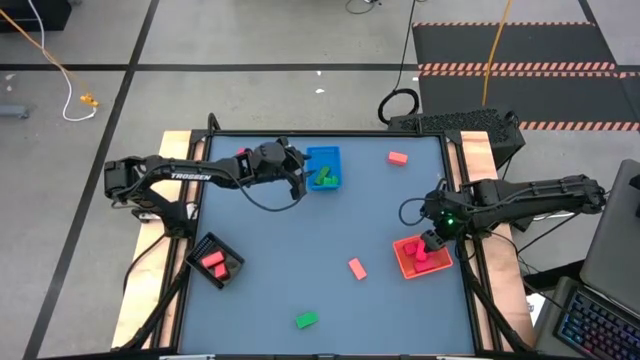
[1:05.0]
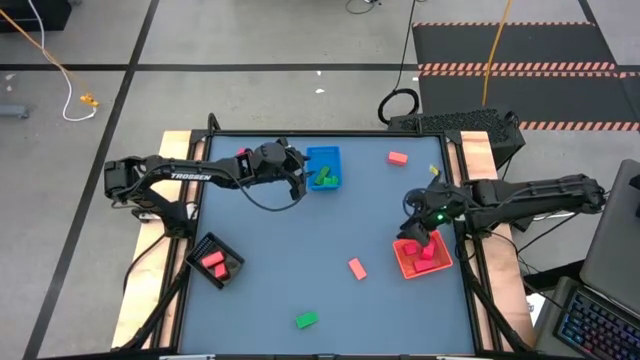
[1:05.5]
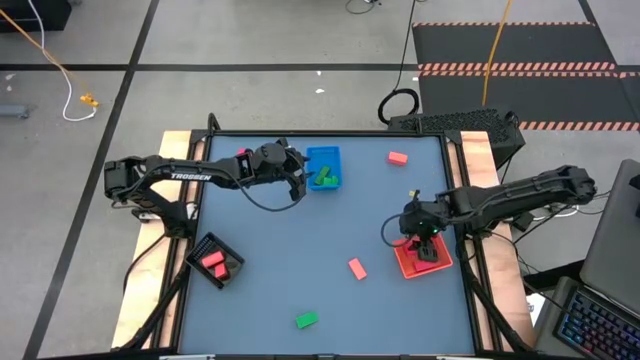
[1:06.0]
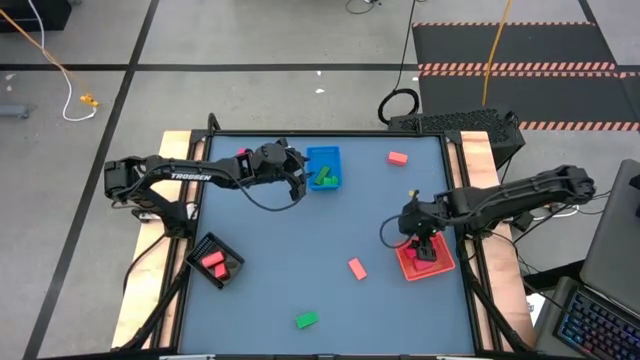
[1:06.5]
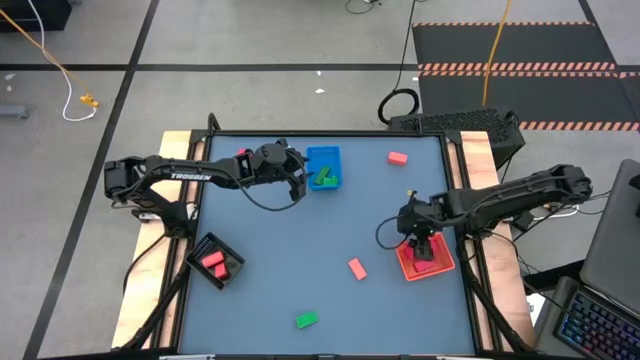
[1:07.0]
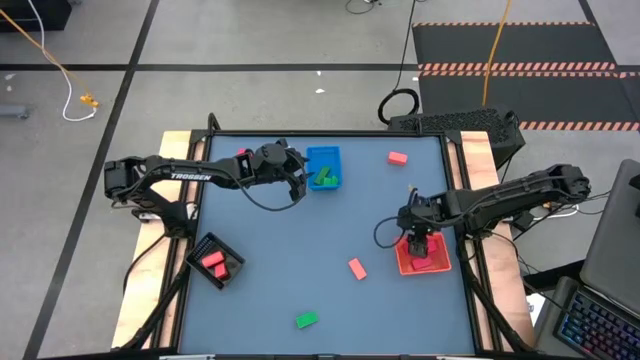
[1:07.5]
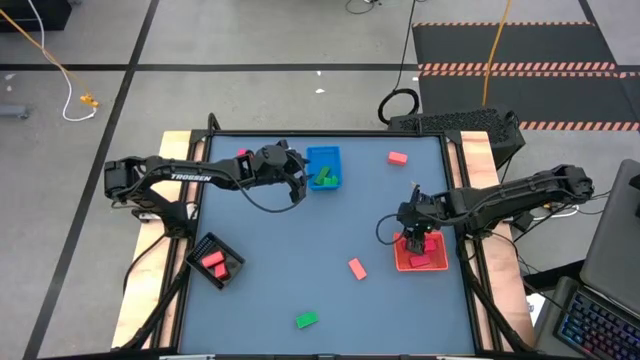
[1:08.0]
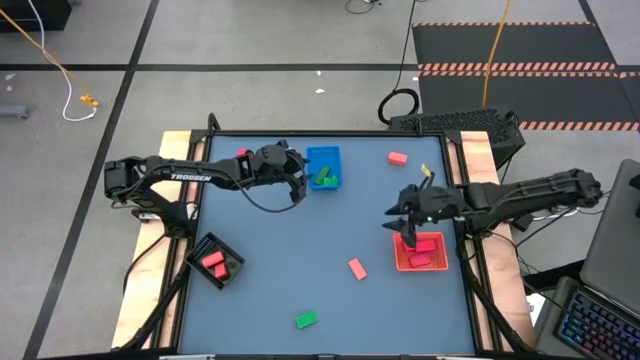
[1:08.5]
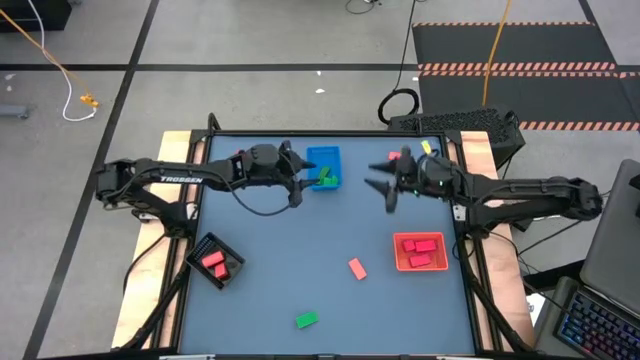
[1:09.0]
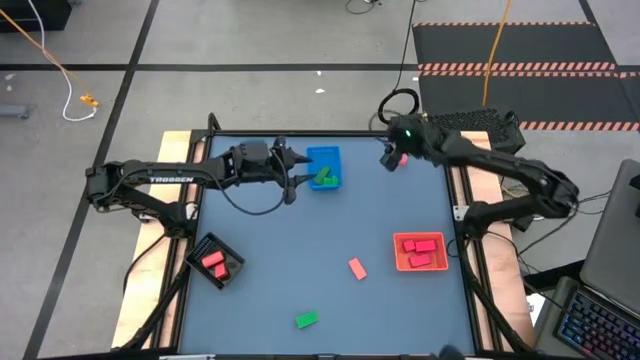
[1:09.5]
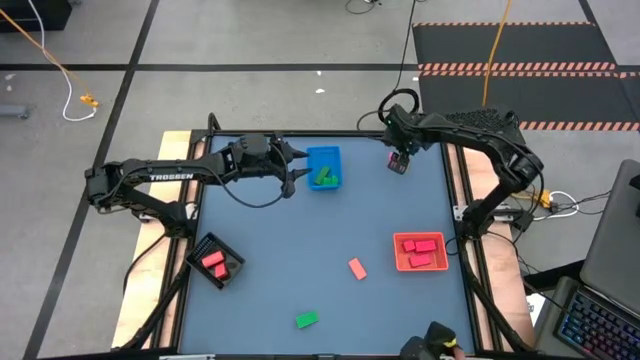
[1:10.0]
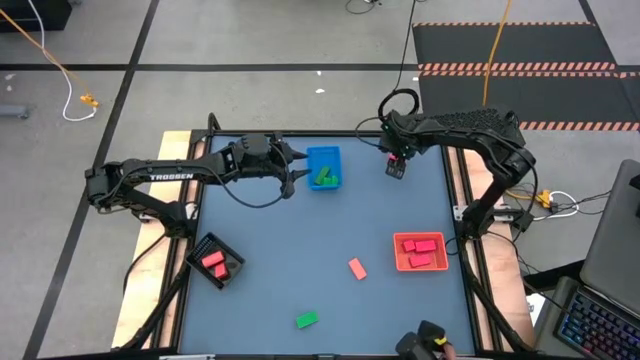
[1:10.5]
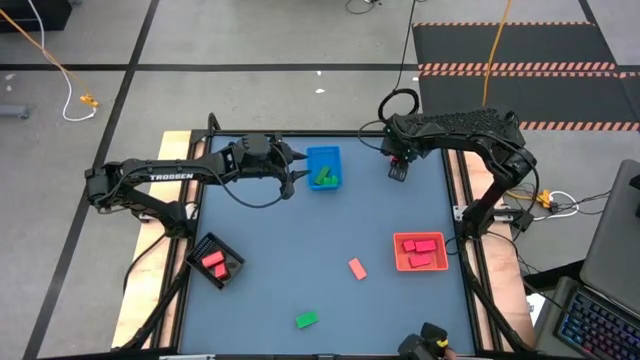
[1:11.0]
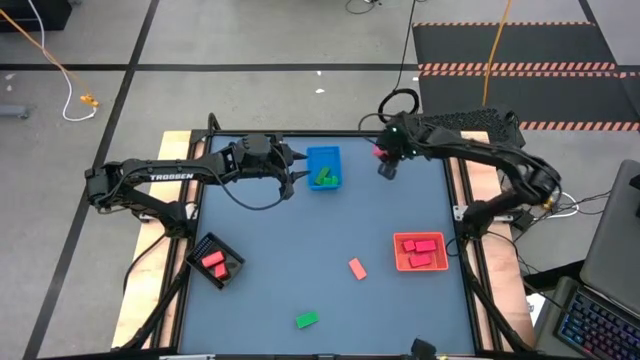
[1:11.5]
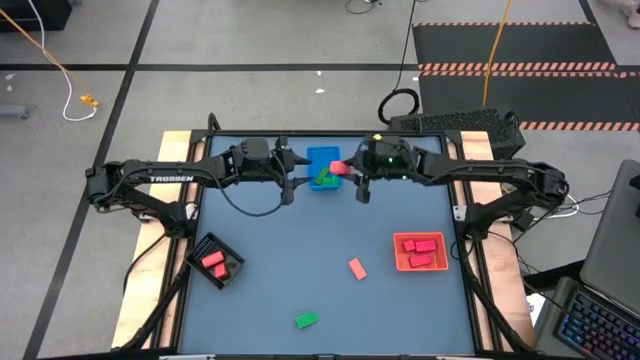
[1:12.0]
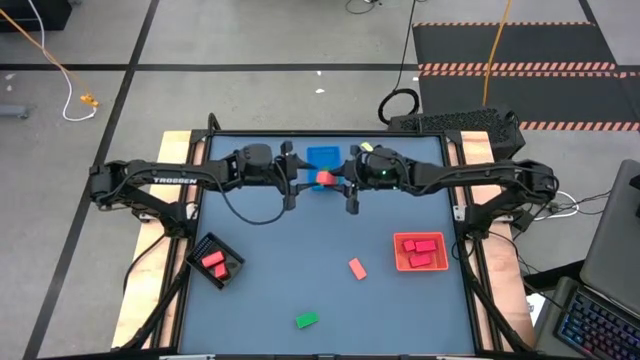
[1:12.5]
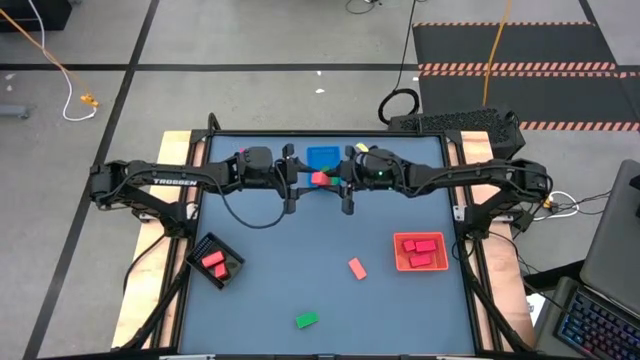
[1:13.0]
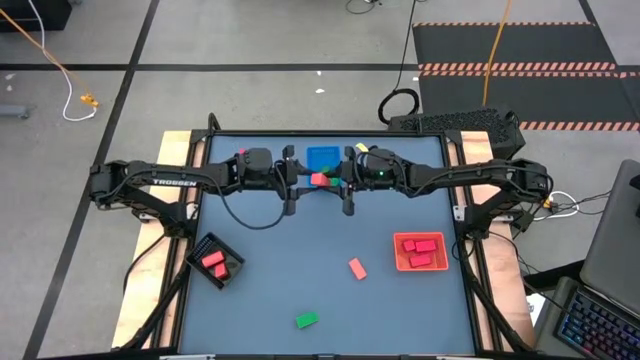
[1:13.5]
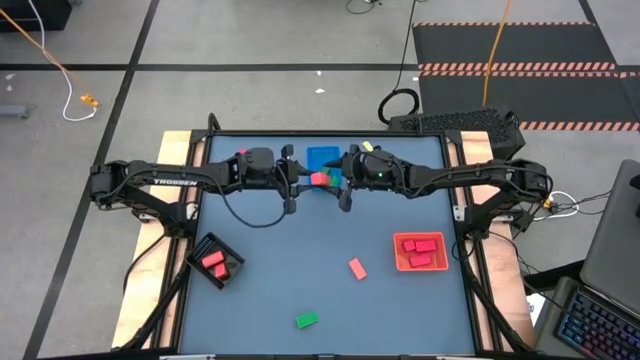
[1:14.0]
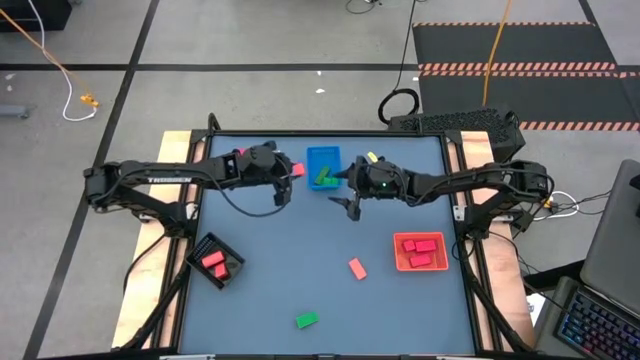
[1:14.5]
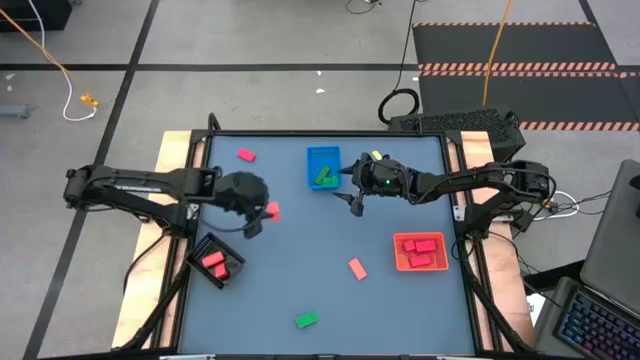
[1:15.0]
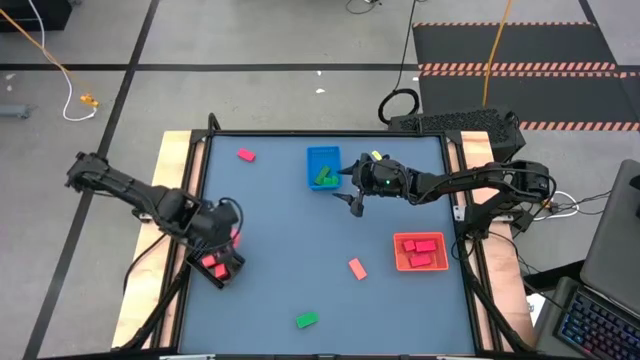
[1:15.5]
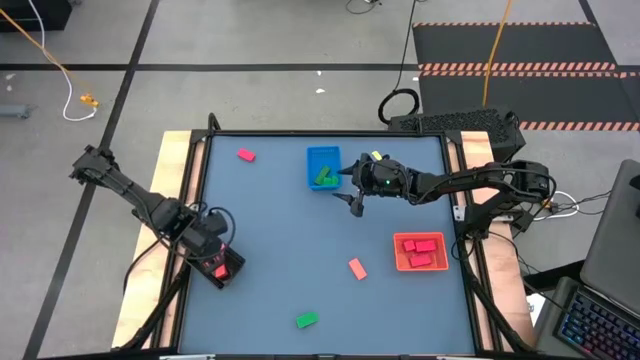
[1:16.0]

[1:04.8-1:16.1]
Task: Sort & place blocks by color
Put the orange block into the black bin

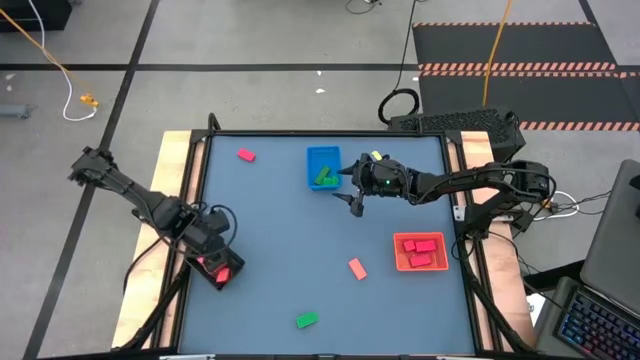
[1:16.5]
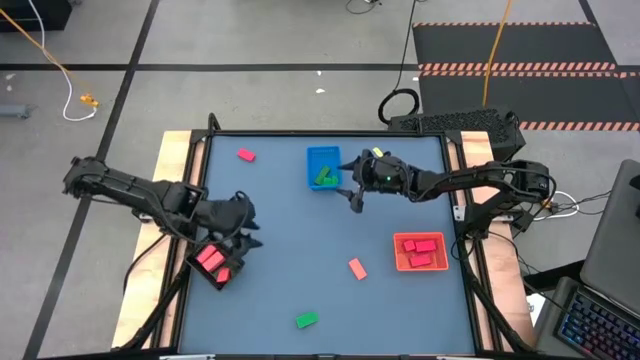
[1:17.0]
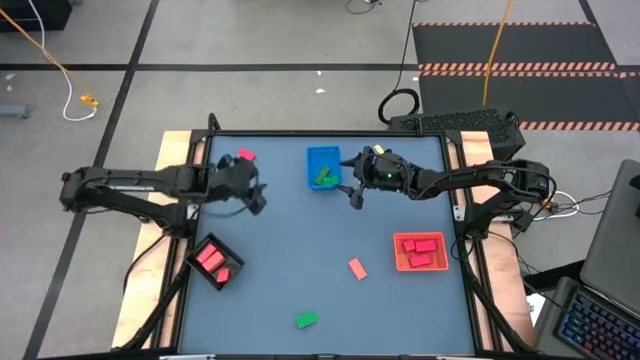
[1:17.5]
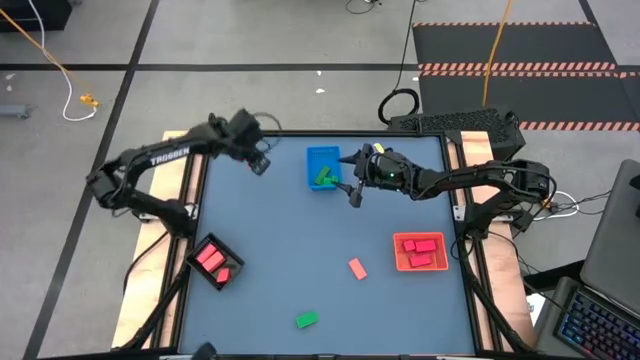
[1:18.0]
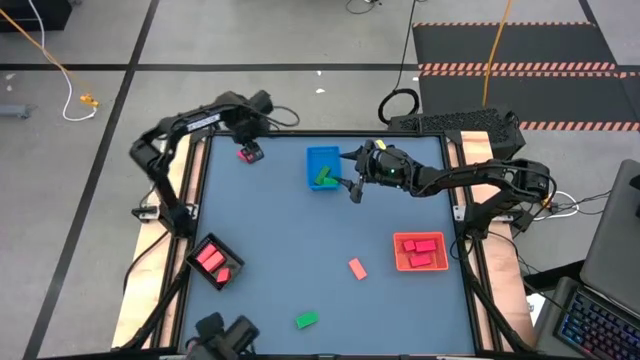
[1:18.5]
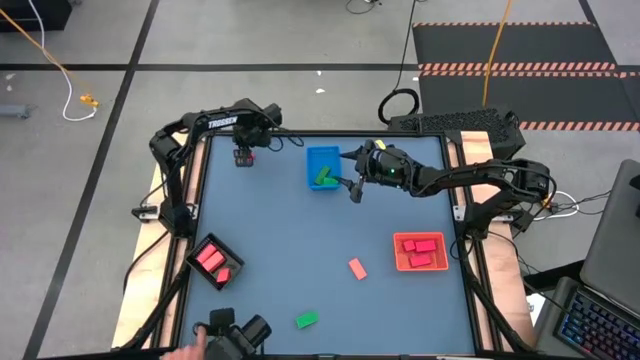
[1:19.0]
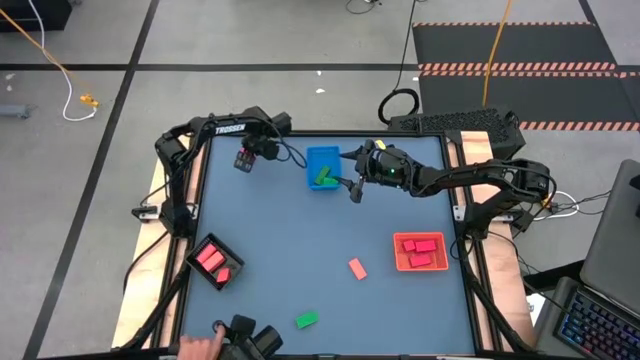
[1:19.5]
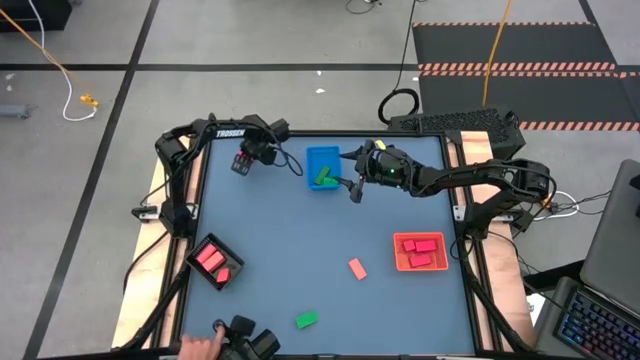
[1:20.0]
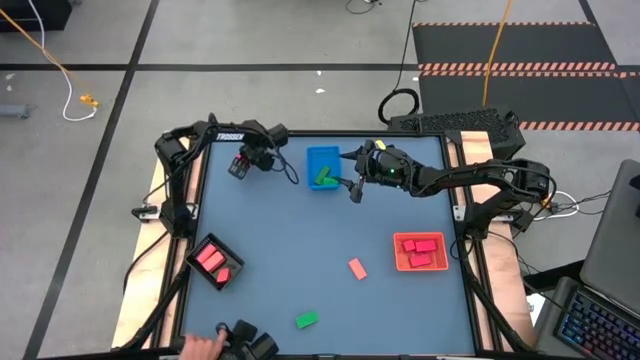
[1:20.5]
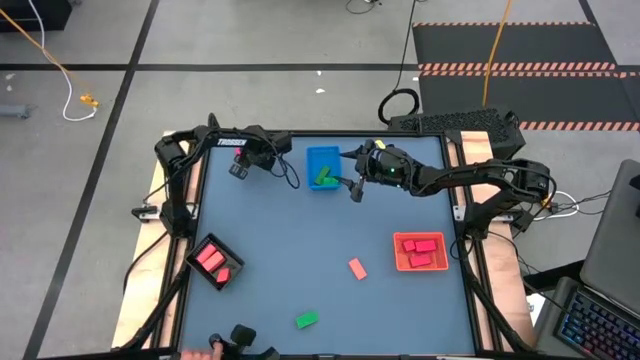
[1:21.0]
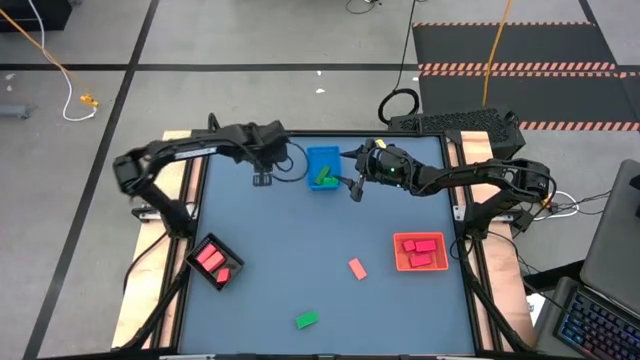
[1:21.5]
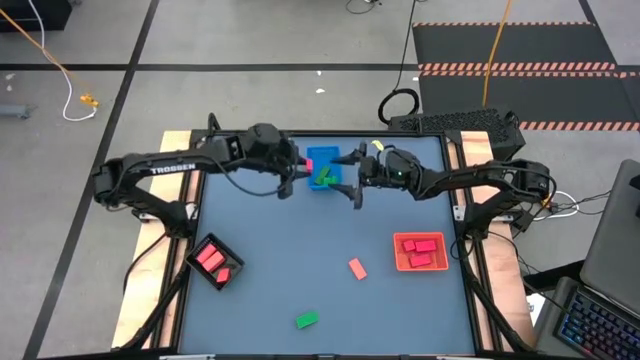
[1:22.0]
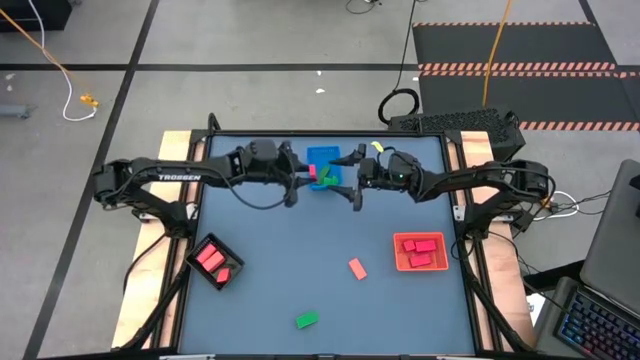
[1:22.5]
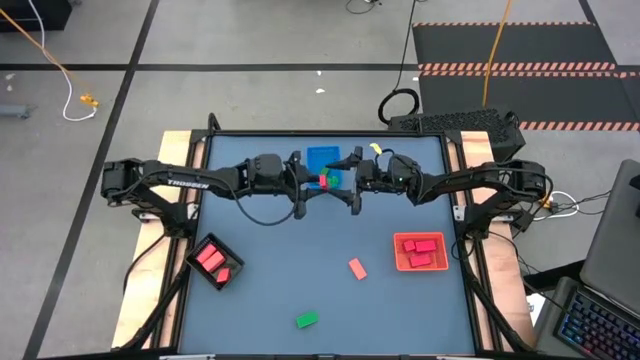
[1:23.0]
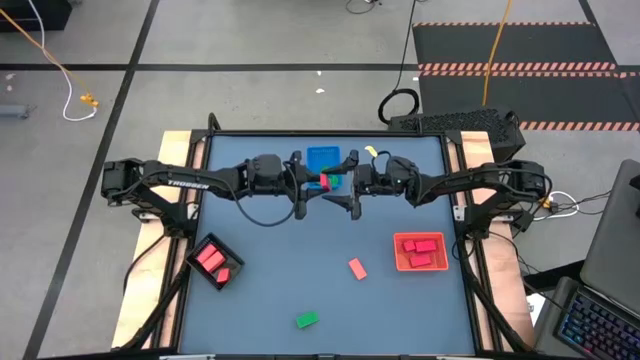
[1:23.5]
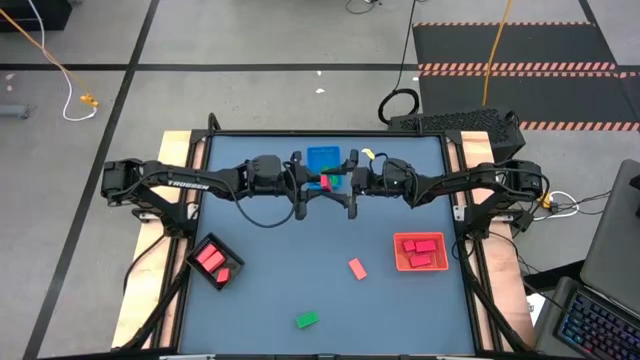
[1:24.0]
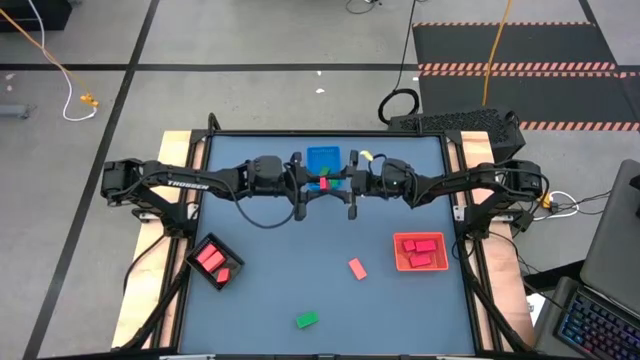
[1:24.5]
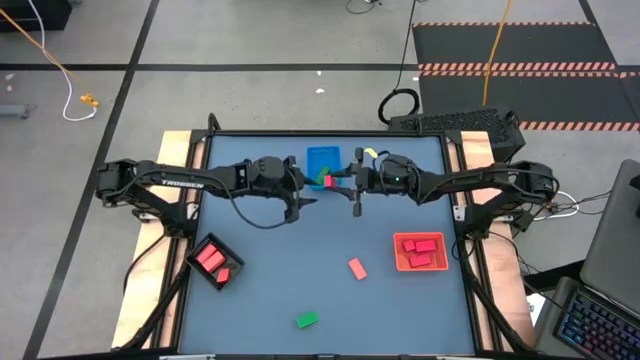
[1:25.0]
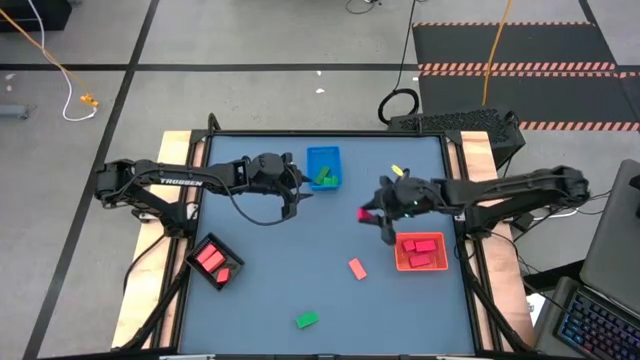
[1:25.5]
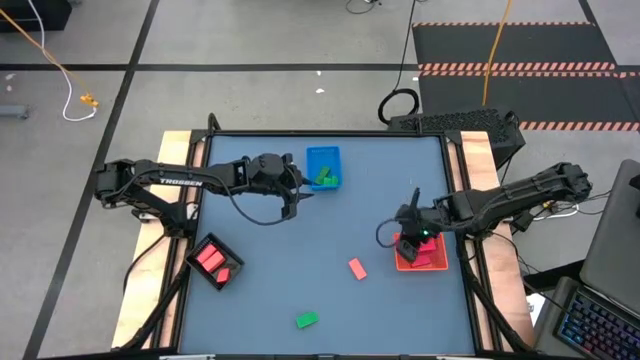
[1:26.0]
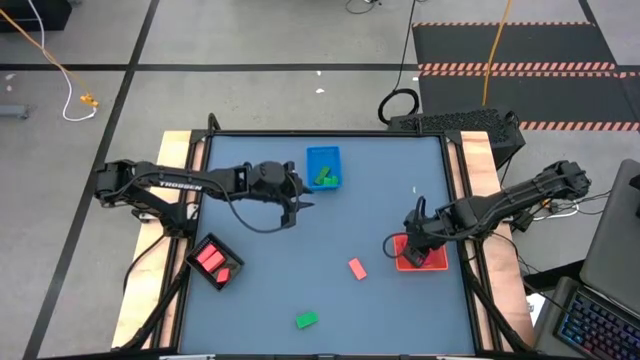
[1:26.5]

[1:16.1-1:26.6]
Put the red block into the orange bin
